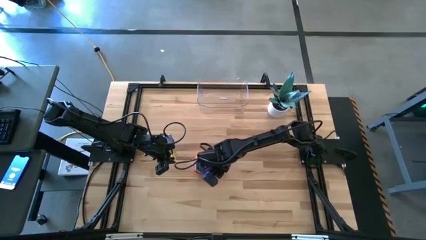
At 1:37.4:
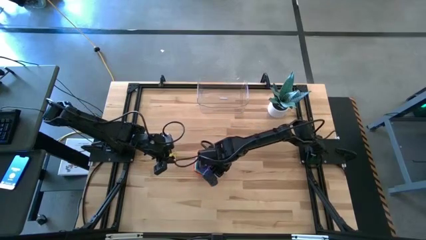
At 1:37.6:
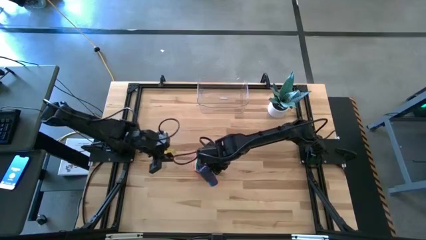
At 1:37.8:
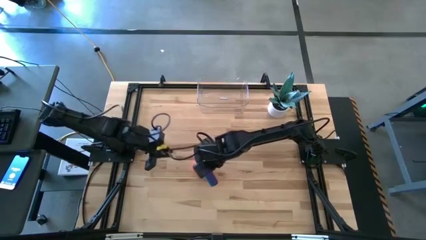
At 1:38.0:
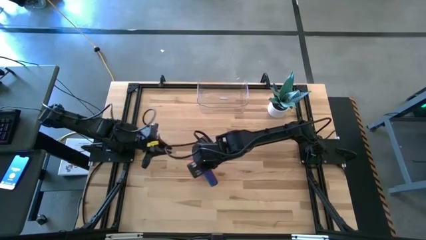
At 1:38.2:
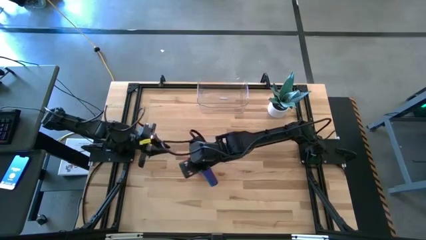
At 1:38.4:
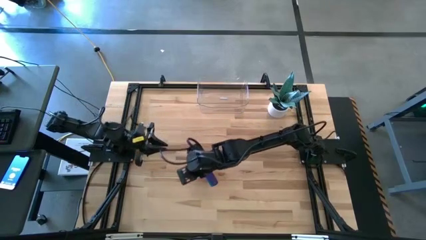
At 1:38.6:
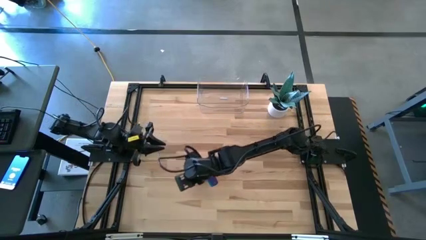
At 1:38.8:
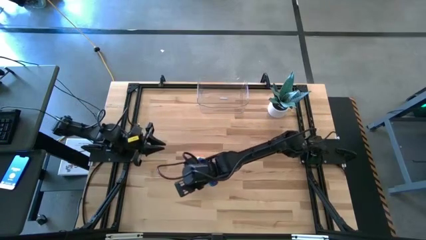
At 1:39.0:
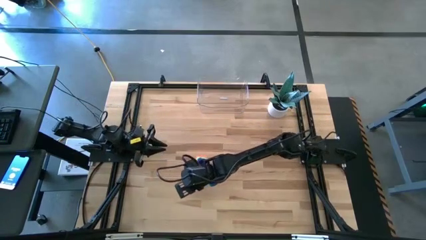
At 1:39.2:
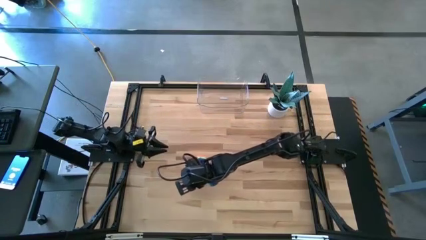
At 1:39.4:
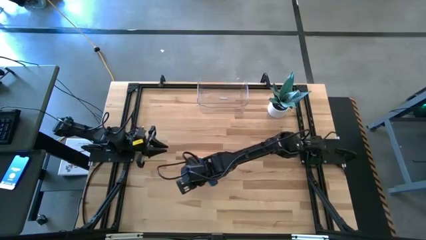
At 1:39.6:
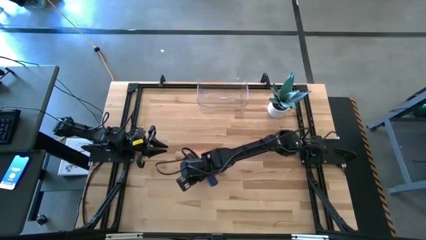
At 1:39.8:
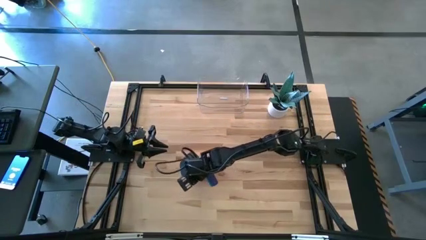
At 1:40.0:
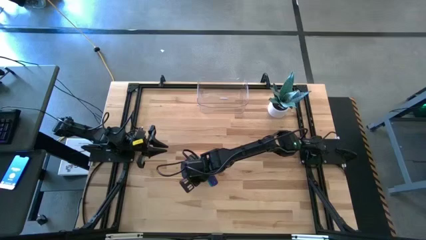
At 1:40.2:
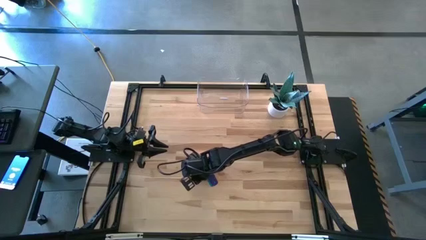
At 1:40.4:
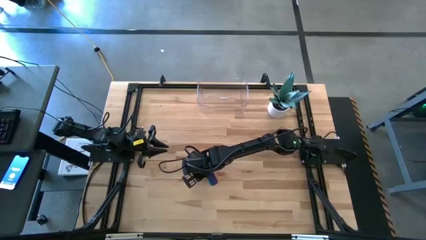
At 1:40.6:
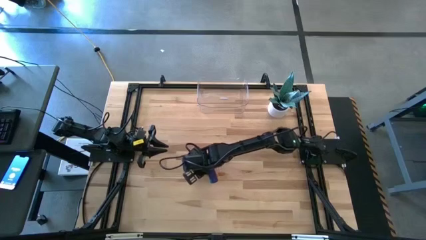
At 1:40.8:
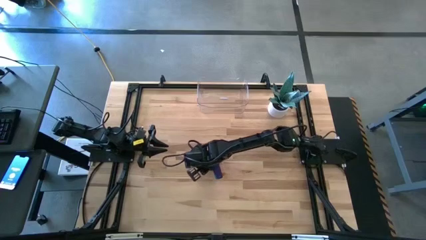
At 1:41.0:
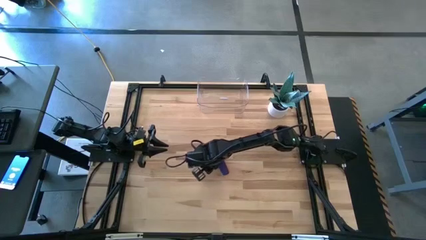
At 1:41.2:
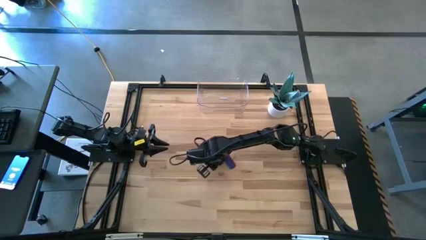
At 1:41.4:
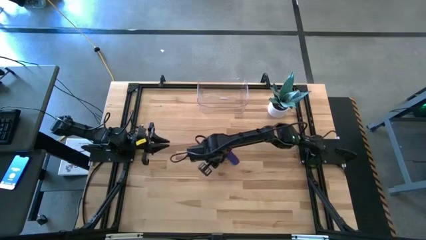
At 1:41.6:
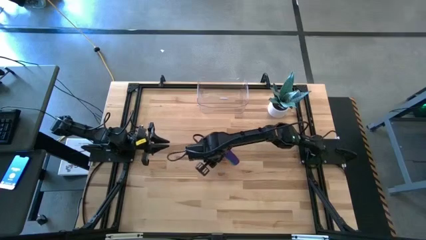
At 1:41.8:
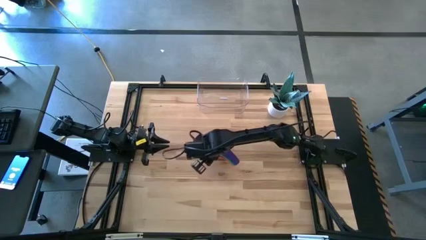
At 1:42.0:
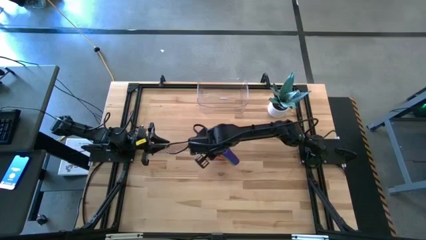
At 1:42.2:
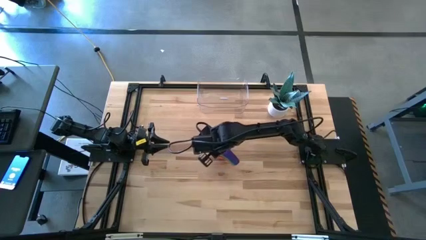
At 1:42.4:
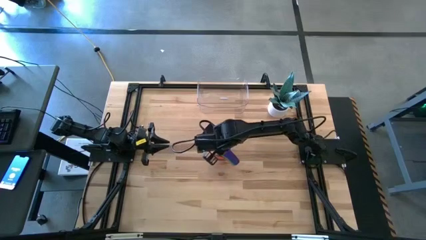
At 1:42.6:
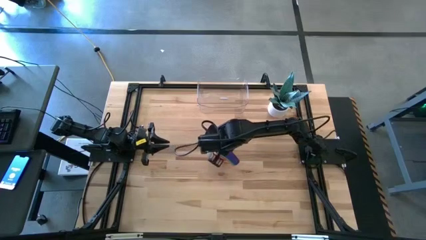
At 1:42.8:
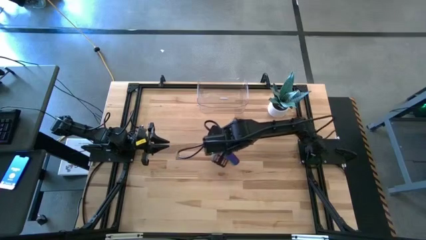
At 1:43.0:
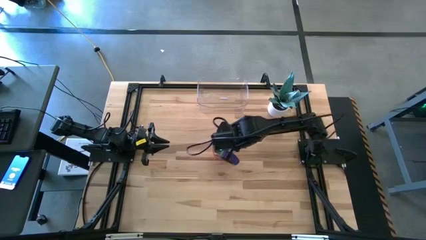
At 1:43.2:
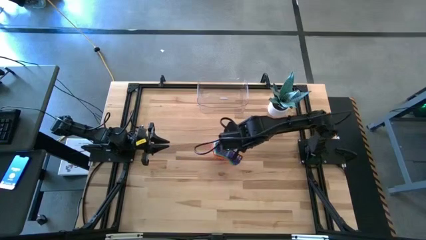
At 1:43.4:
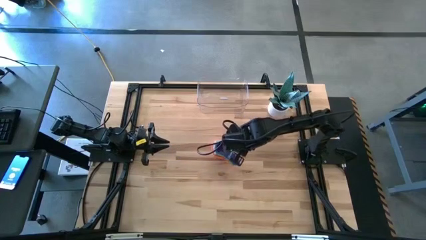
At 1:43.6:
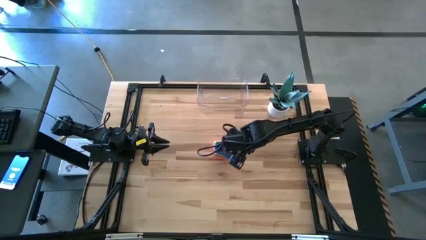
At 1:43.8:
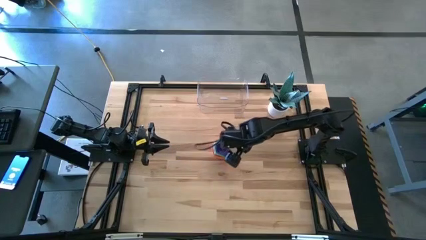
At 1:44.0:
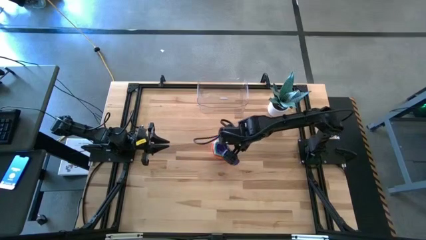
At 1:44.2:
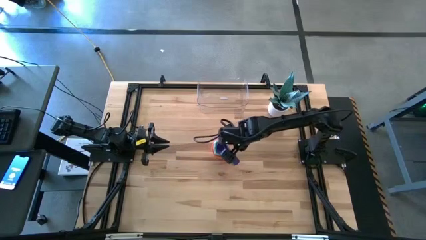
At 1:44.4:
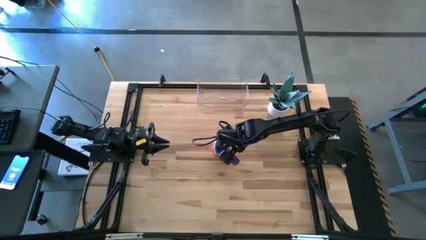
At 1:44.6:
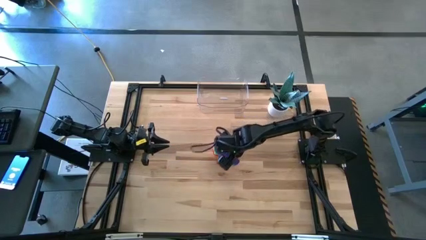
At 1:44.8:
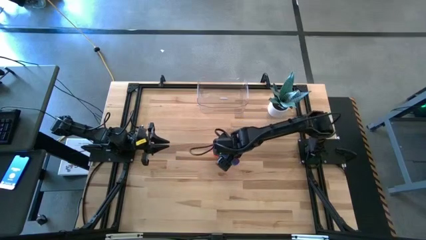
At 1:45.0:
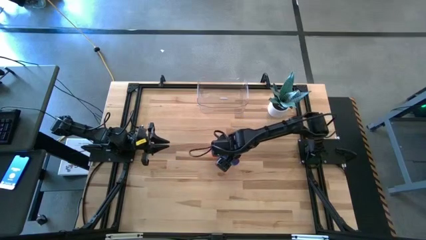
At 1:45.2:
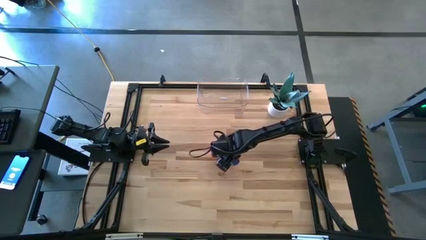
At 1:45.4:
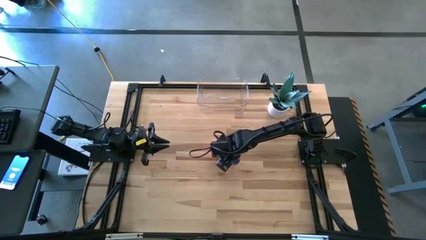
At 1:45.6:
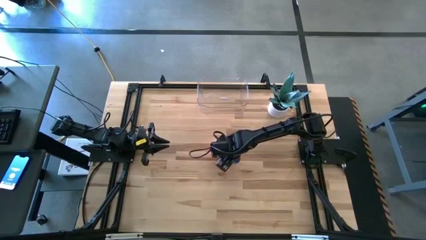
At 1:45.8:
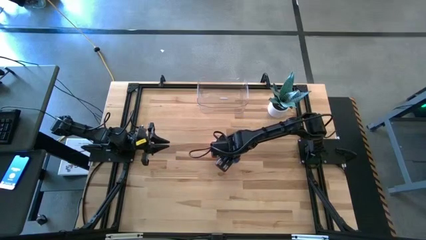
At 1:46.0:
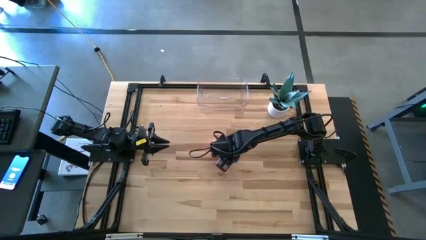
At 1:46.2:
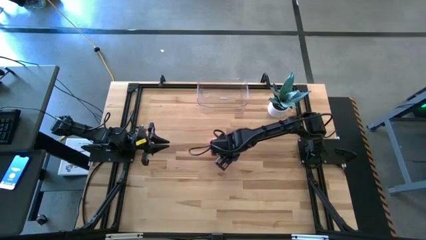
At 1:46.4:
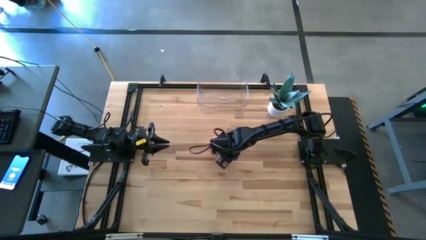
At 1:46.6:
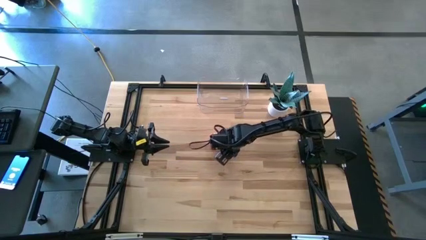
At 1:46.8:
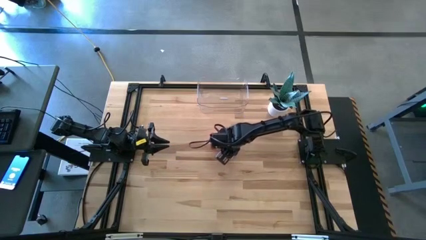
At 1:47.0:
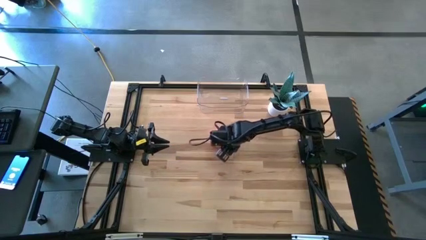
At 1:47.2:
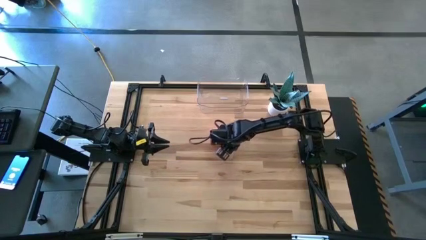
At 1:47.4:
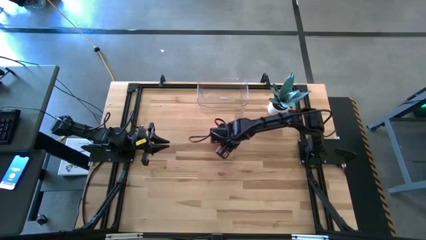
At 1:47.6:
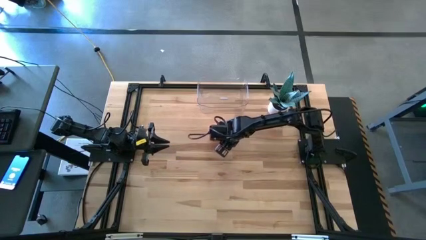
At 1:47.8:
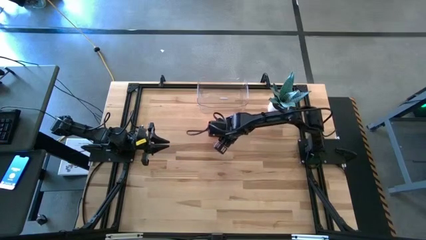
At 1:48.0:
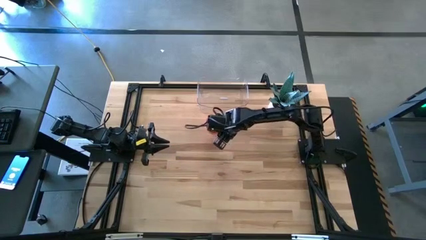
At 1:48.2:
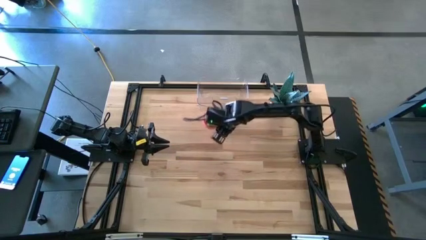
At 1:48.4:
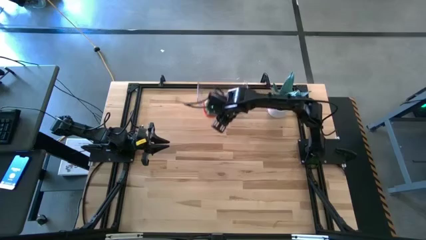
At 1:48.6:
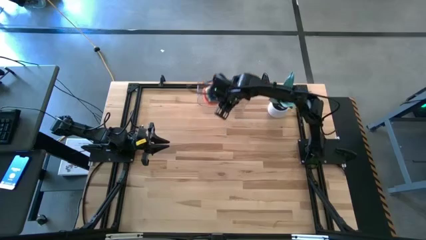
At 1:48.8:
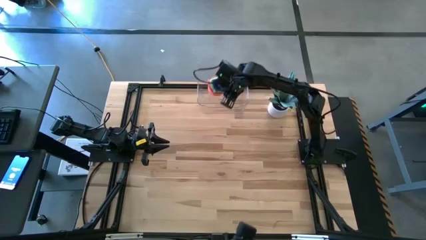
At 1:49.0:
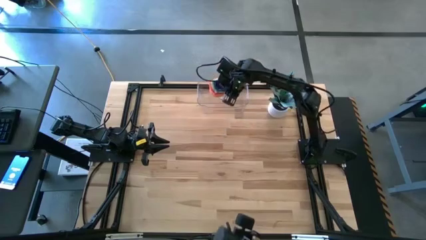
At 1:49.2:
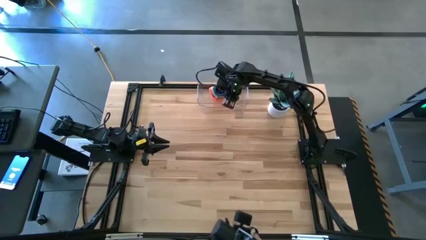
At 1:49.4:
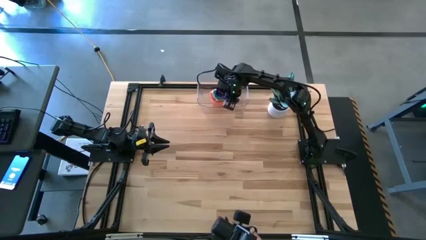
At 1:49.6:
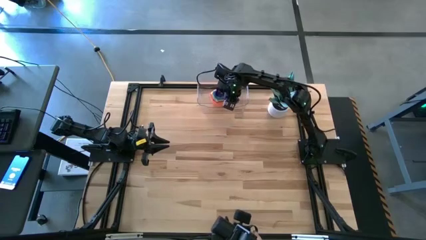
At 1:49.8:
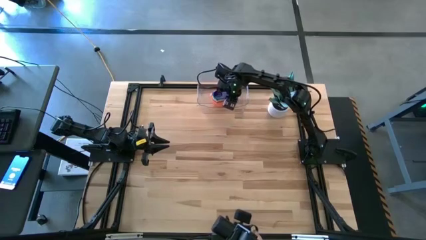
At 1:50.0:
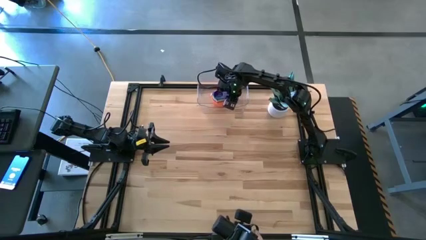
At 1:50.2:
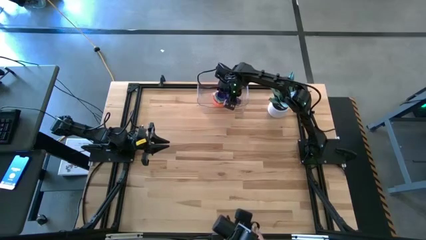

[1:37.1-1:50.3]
Task: Nest measuring cups in basket
Put the nested measuring cups into the transparent bin

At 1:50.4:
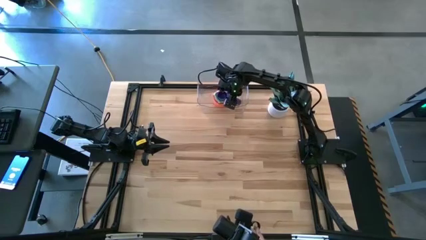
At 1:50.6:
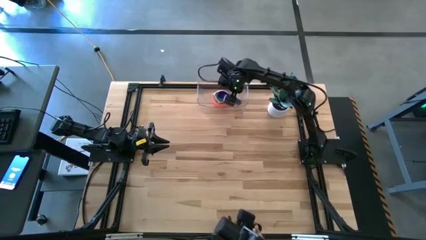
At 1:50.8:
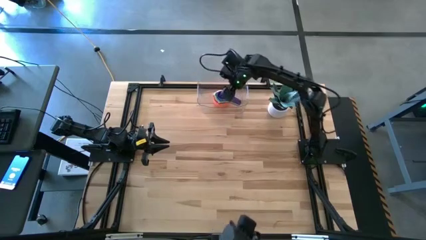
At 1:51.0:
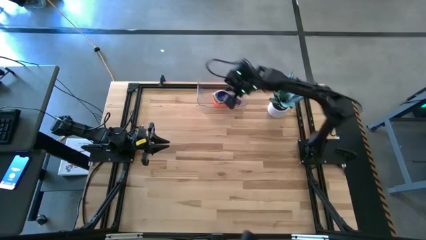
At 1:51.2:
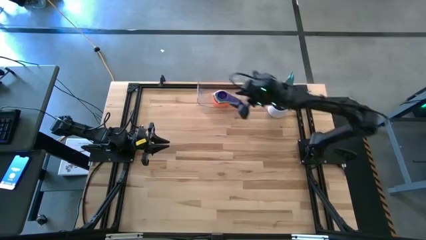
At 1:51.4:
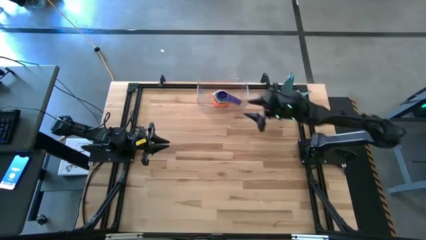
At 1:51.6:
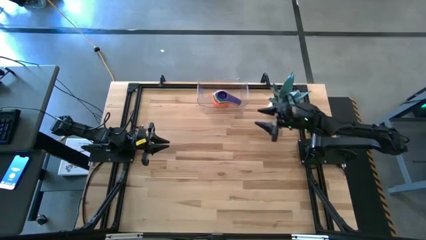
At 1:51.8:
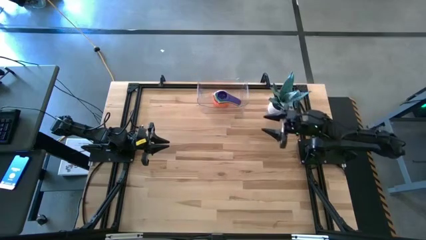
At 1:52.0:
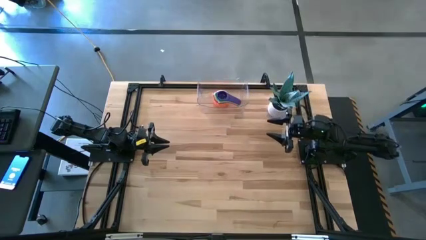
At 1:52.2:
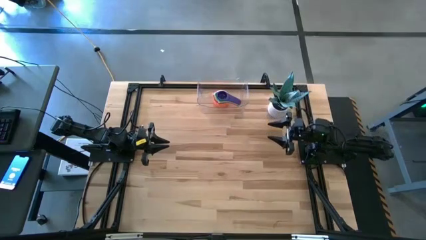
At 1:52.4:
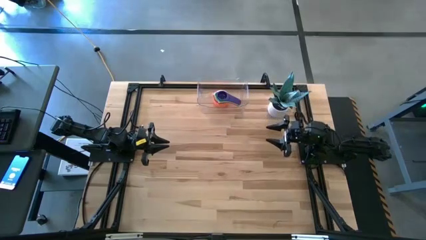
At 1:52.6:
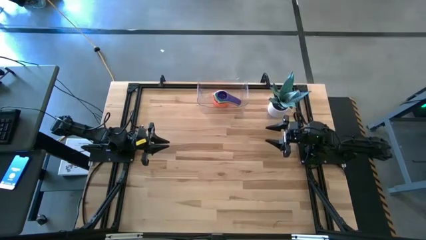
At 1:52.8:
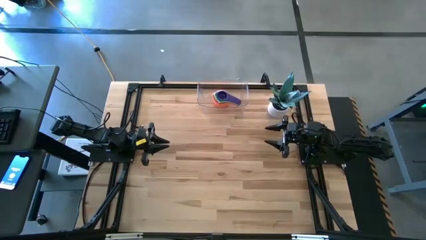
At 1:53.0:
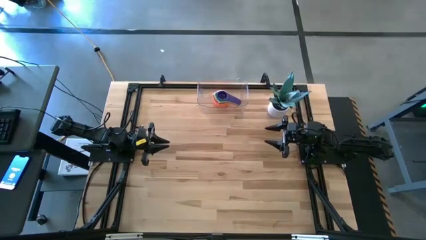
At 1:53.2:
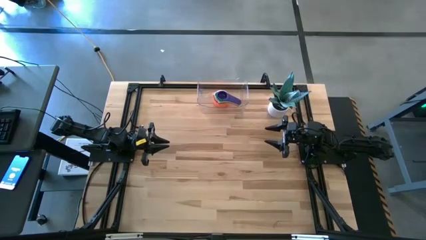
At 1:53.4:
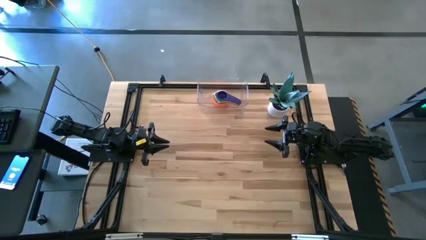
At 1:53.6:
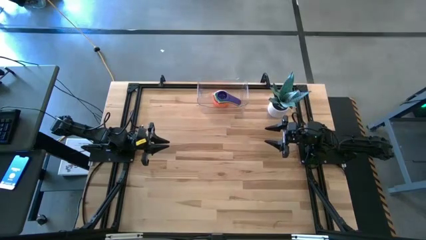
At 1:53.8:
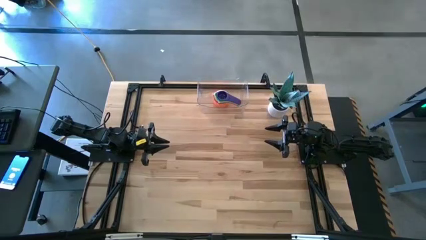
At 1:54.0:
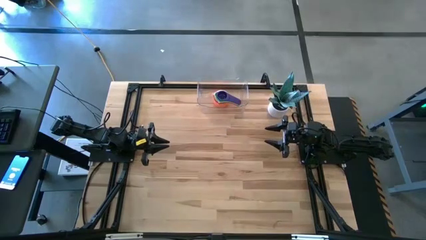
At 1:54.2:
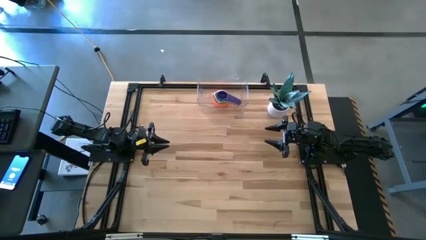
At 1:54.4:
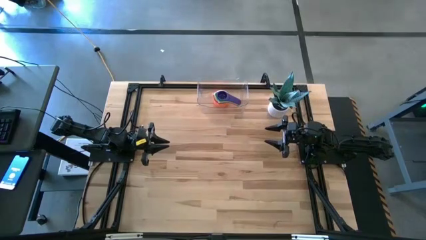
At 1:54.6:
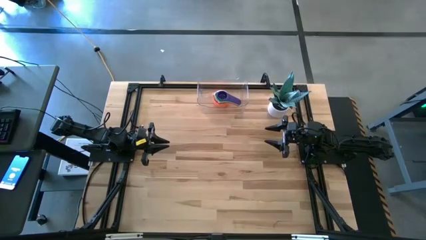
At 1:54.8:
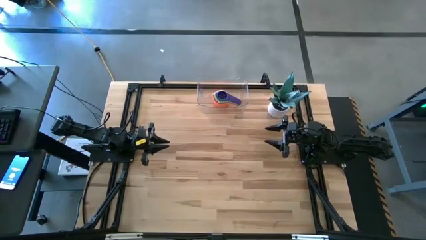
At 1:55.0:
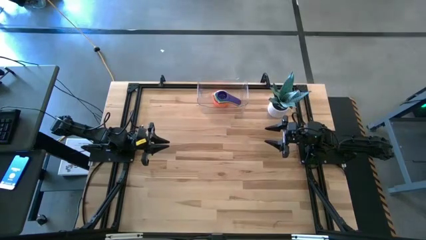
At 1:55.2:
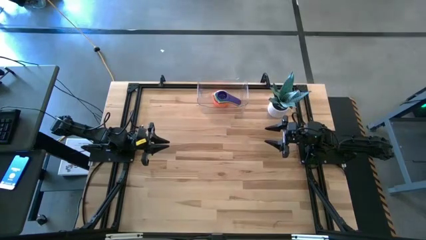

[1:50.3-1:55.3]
Return to Home Position
